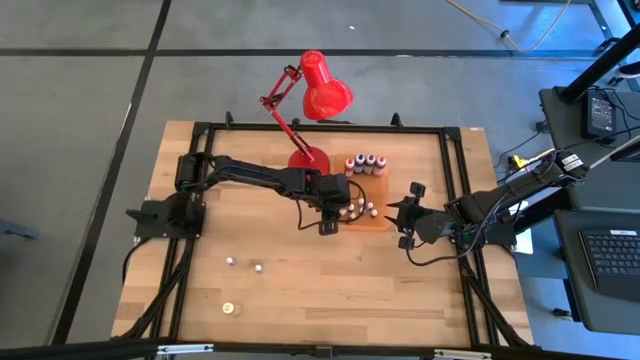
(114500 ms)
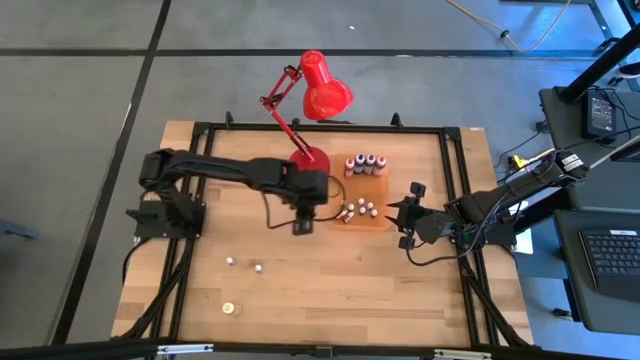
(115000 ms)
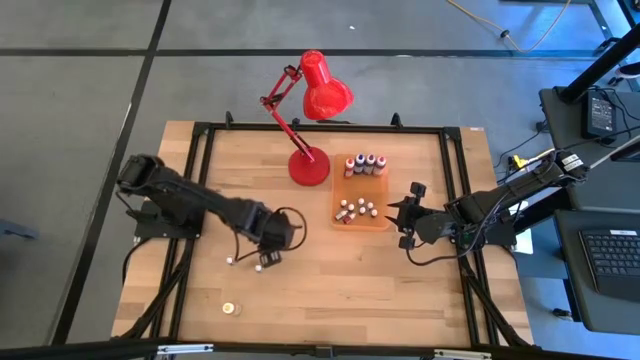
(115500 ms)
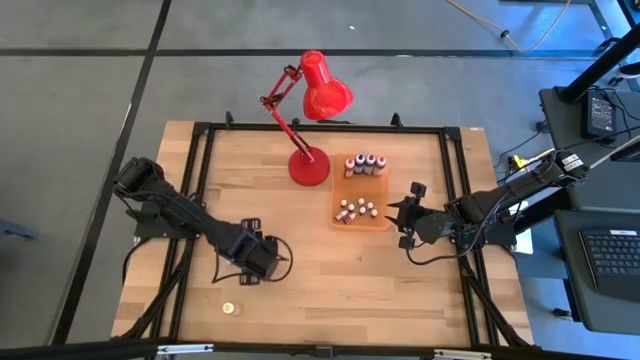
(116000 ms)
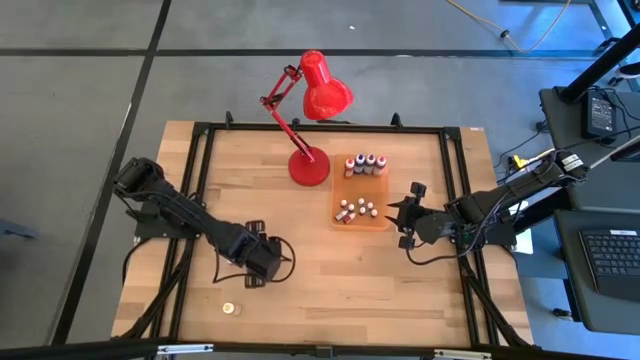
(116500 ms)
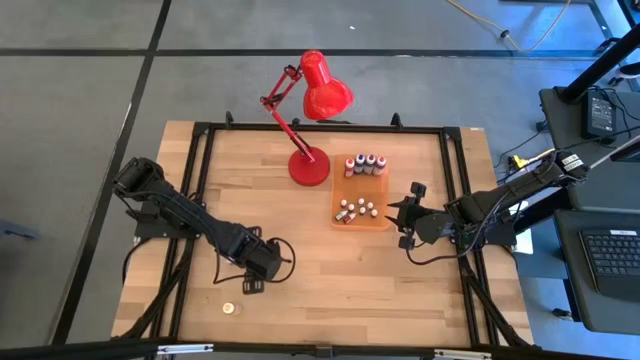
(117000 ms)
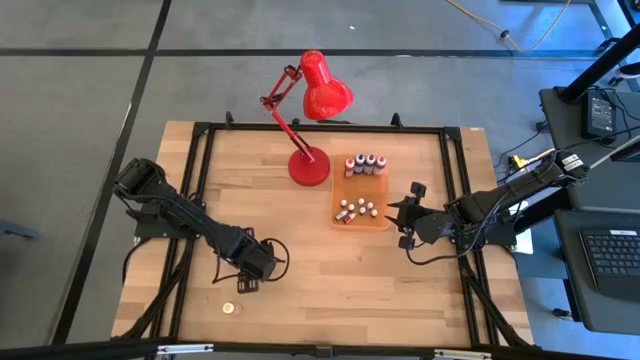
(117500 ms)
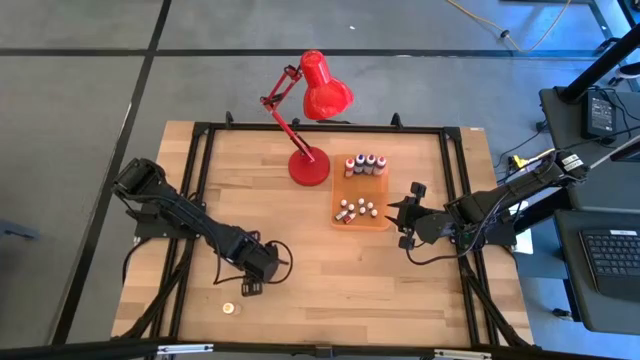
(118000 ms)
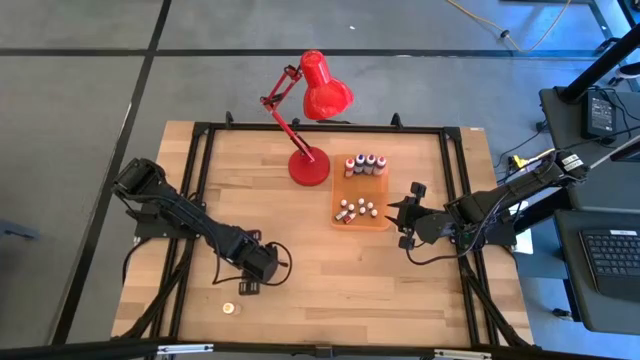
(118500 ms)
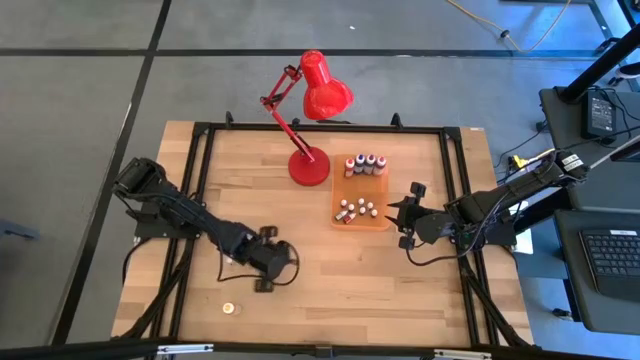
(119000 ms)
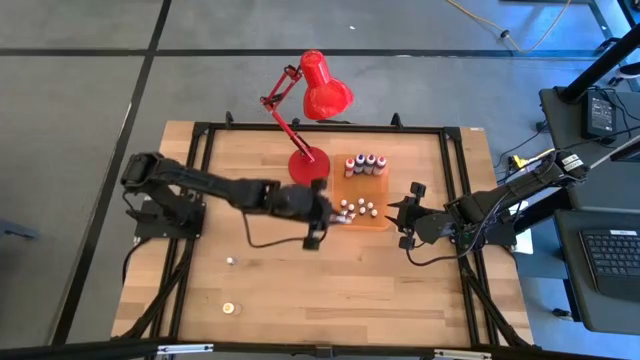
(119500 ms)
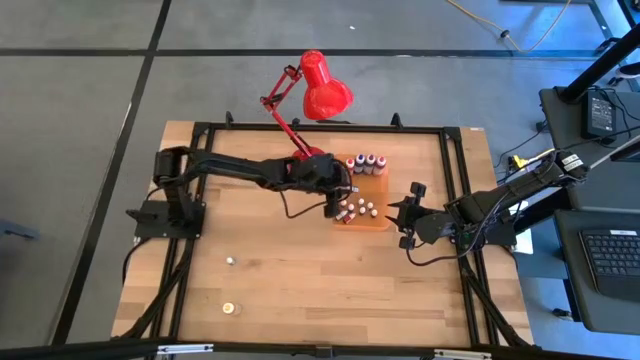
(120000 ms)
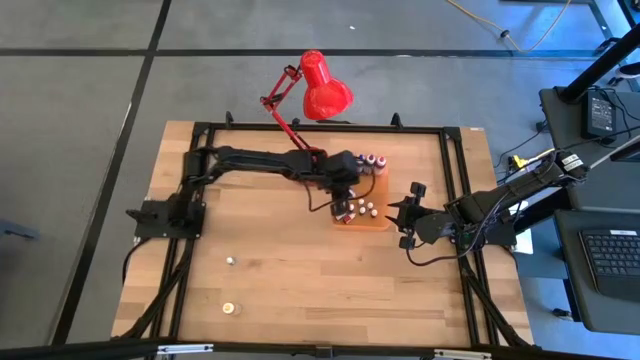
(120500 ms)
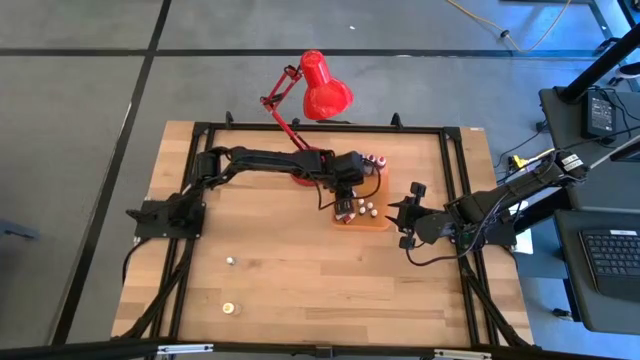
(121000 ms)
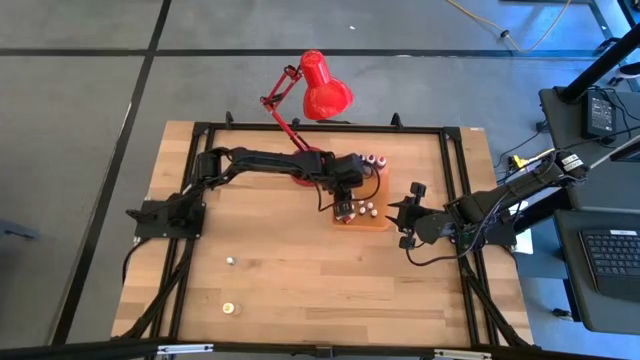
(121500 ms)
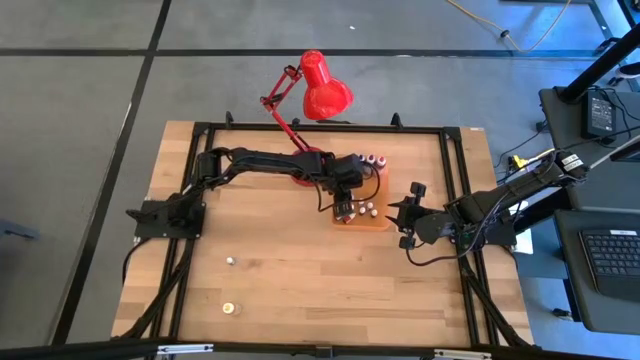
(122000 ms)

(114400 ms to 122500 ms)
Task: Pick & Place food coloring
Put the small black food coloring bottle into the orange bin

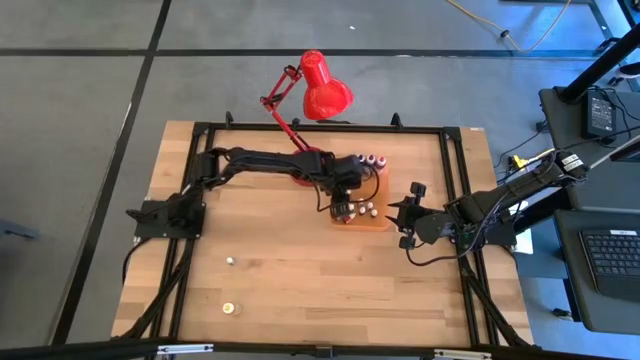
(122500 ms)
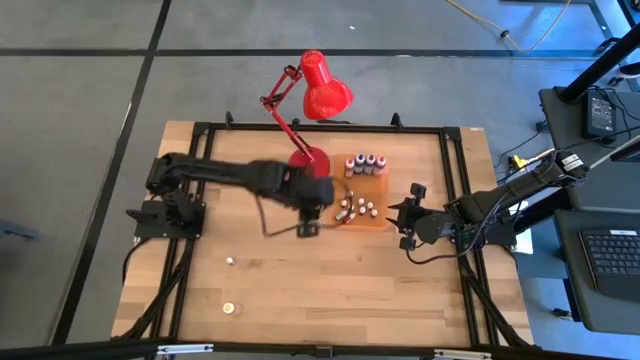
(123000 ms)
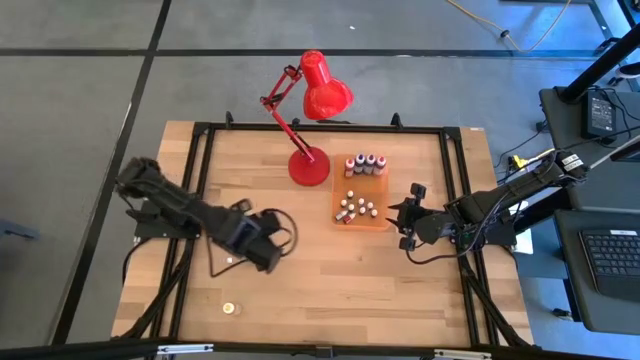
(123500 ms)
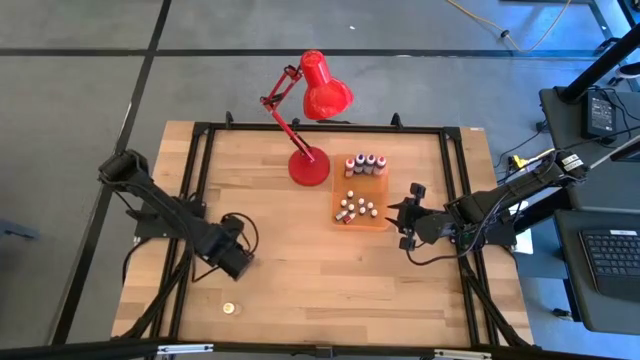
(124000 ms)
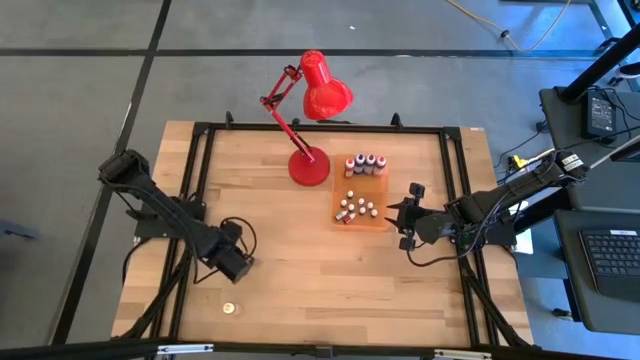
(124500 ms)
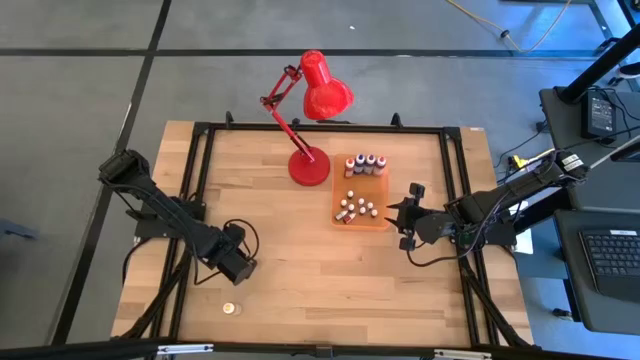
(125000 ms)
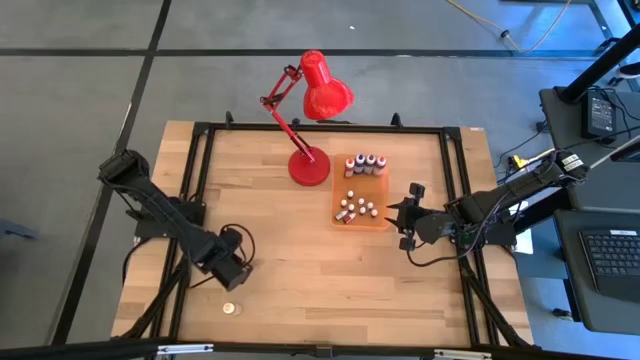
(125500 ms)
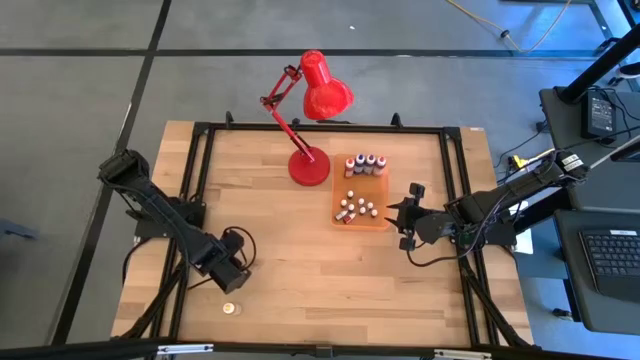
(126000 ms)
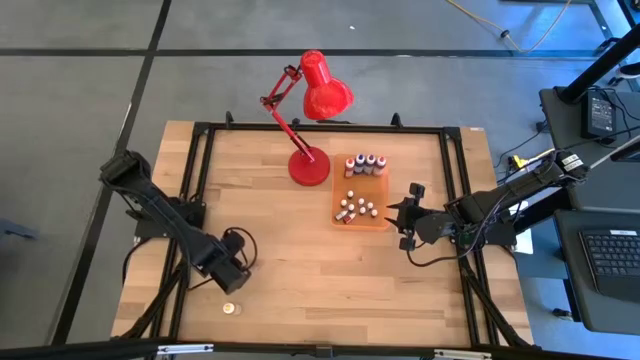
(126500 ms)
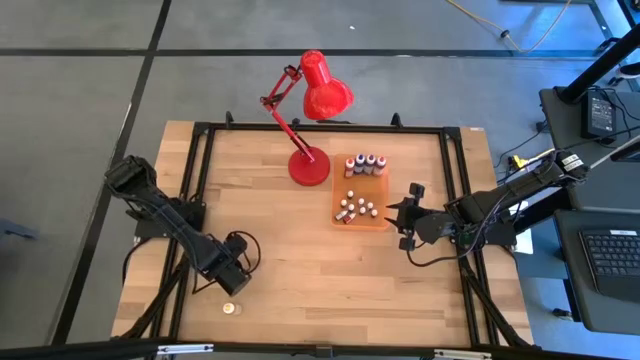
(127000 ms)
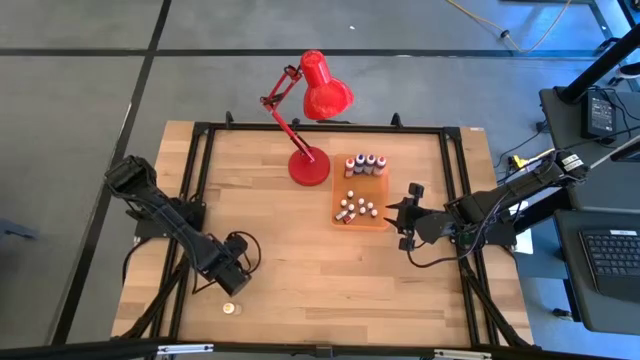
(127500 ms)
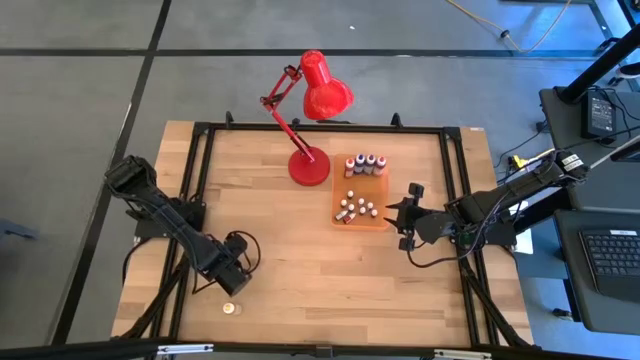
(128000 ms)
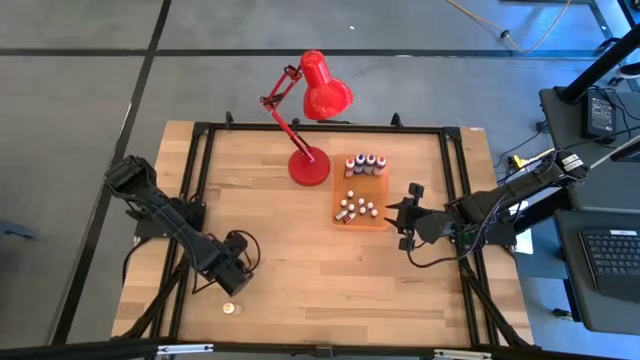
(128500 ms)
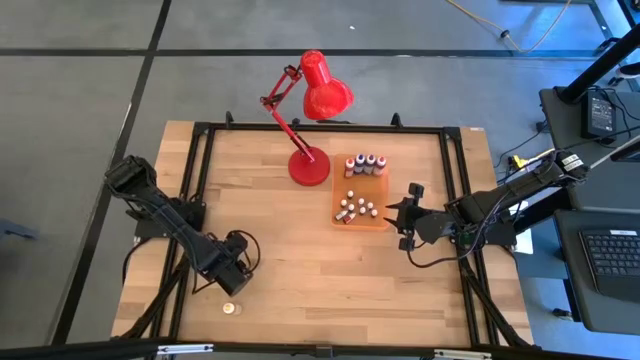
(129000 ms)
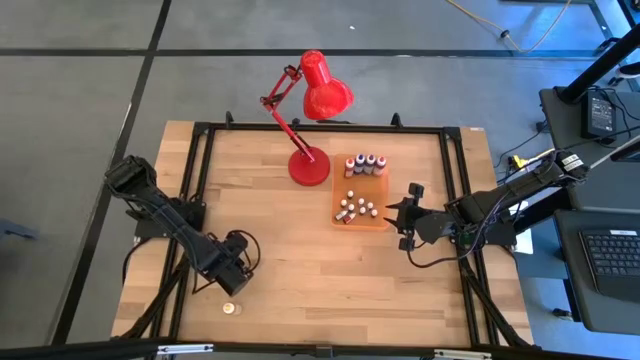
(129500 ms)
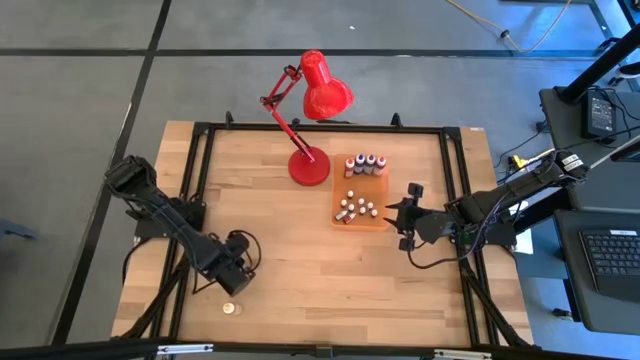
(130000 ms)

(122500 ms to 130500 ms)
Put the small brown food coloring bottle into the orange bin

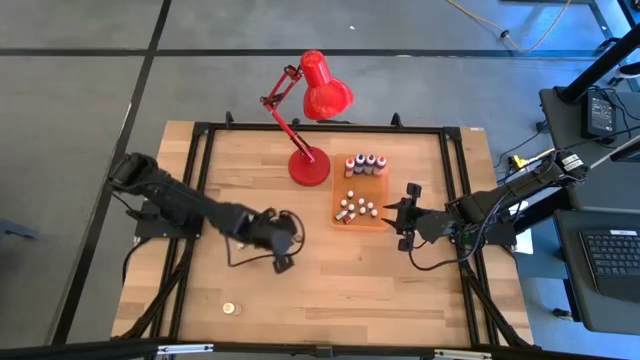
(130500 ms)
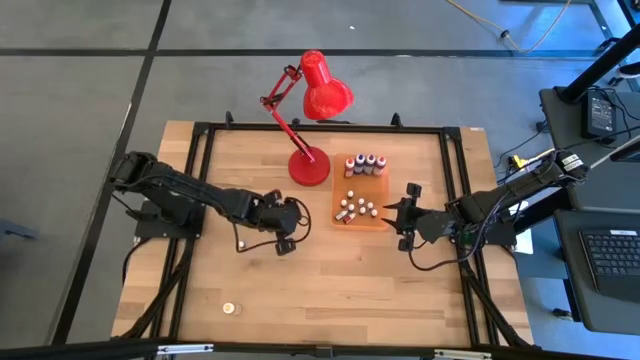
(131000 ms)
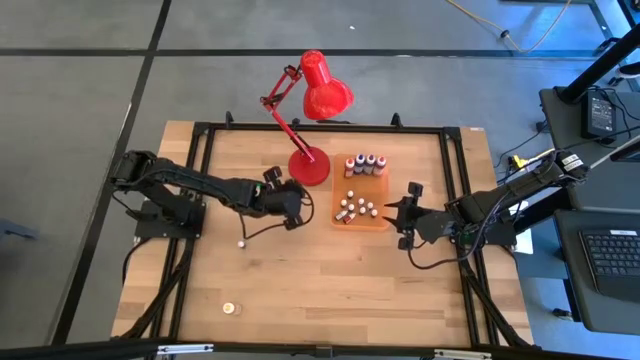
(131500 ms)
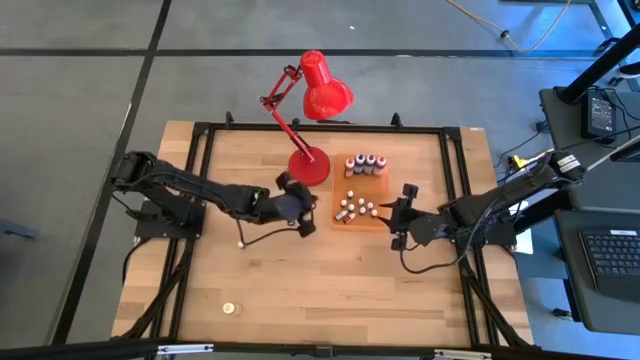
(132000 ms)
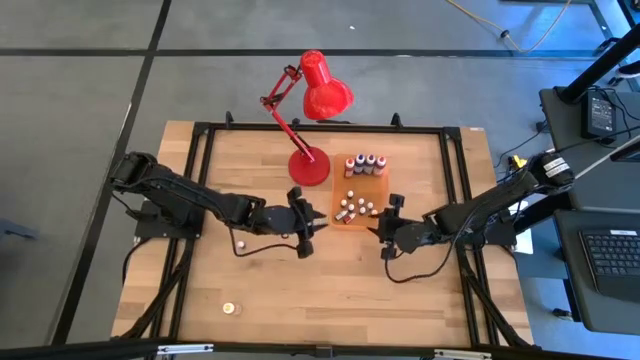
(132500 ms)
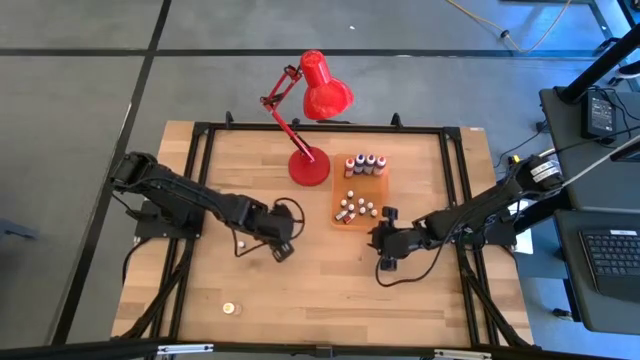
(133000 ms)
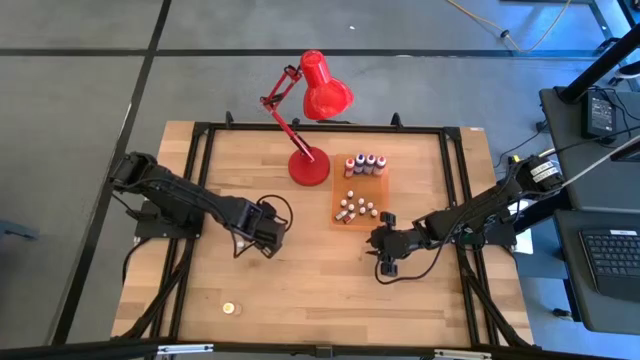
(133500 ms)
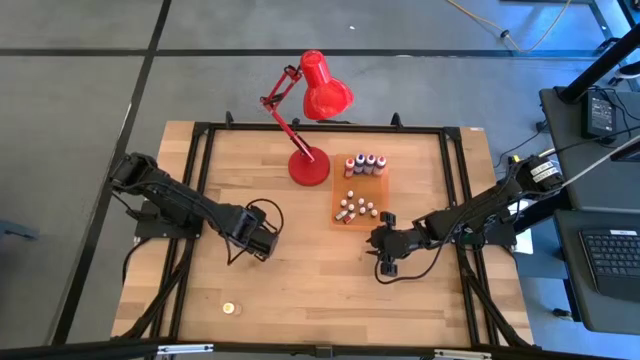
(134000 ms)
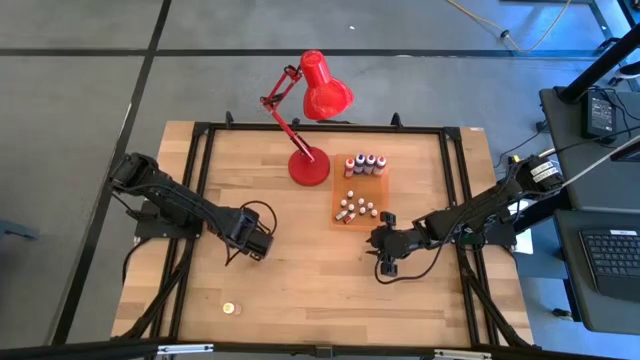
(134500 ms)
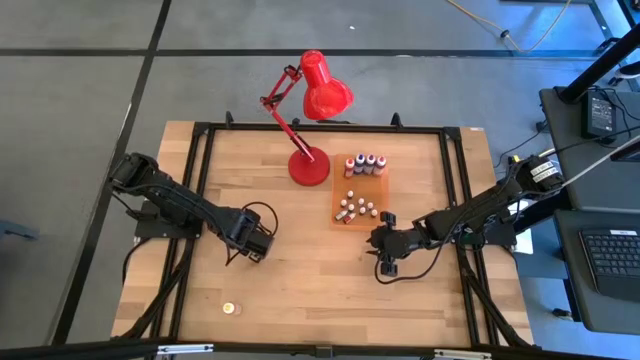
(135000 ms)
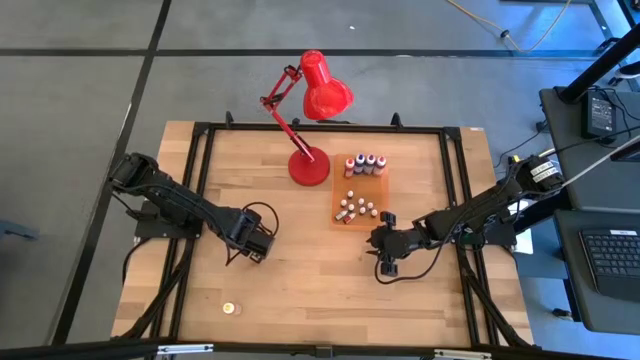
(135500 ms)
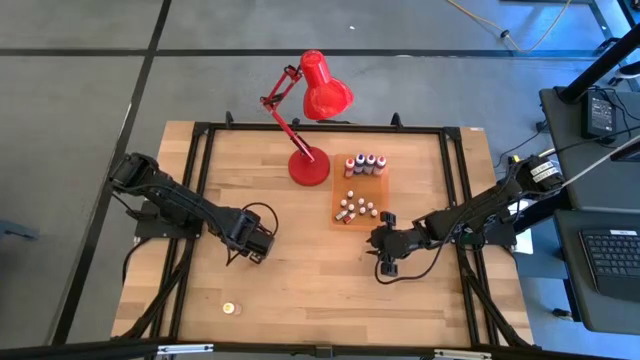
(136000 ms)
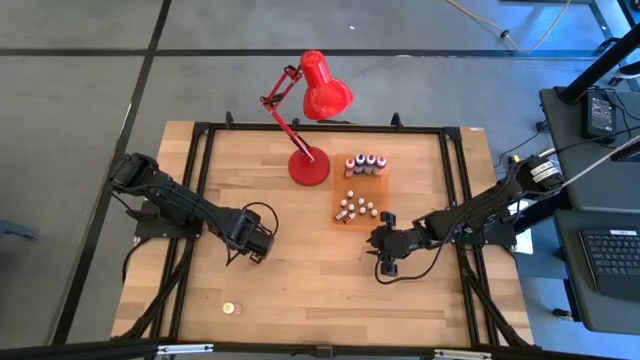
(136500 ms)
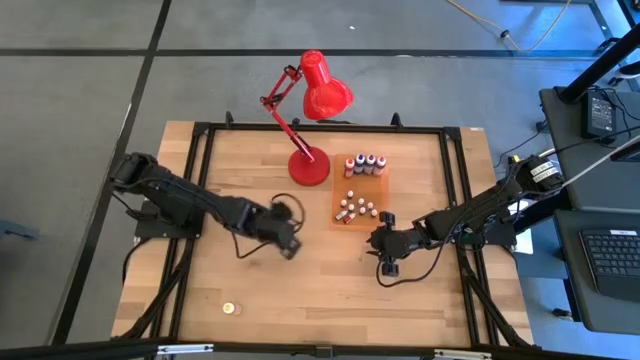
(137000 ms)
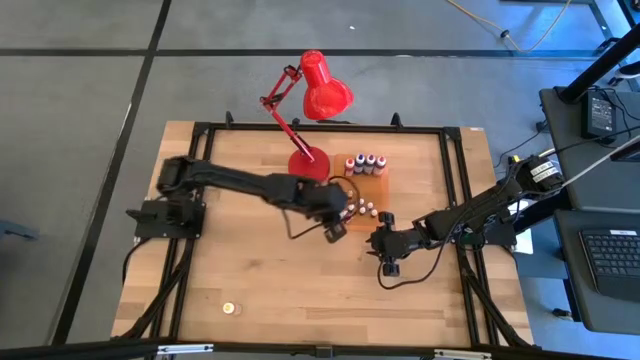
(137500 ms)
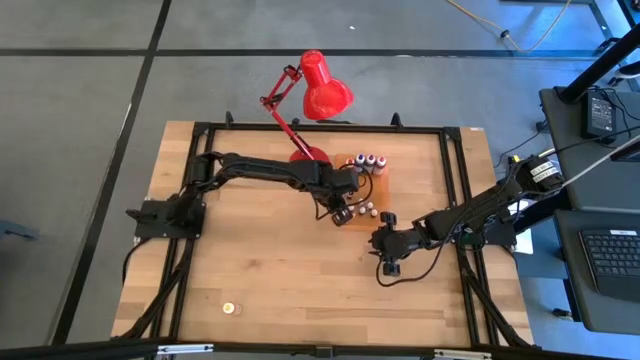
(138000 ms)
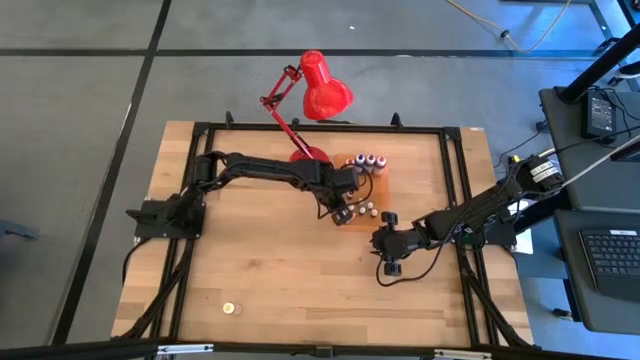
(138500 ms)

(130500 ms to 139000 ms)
Put the small brown food coloring bottle into the orange bin
